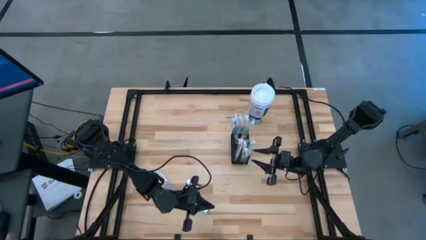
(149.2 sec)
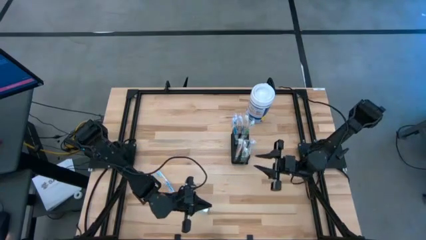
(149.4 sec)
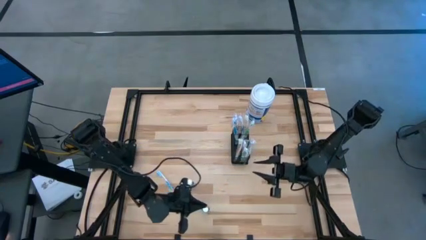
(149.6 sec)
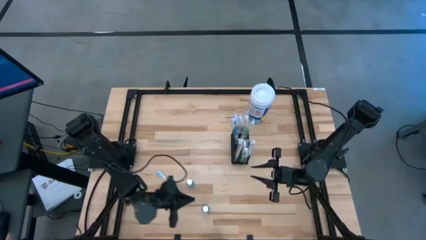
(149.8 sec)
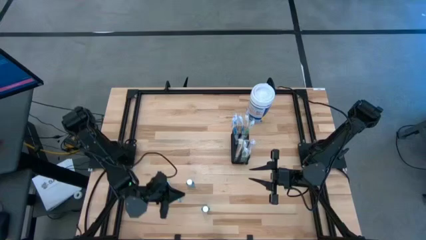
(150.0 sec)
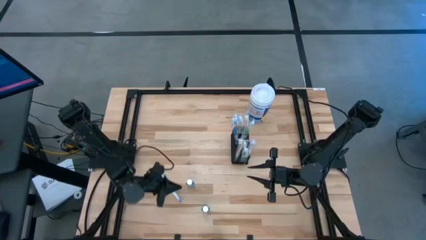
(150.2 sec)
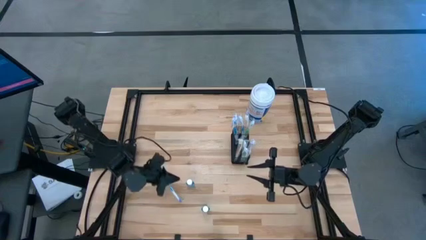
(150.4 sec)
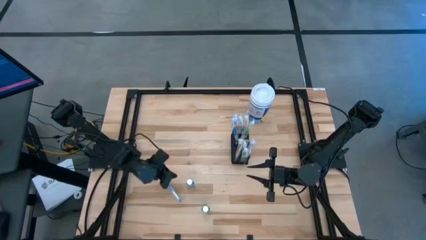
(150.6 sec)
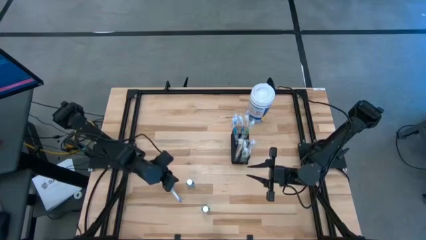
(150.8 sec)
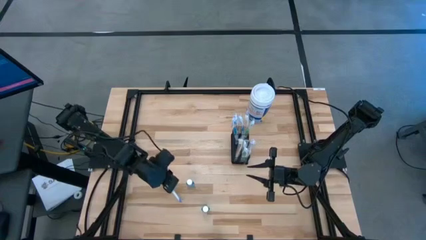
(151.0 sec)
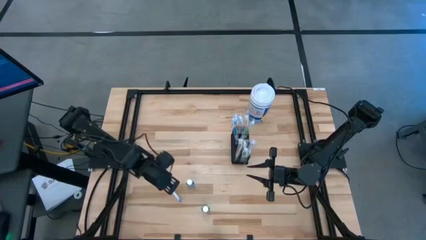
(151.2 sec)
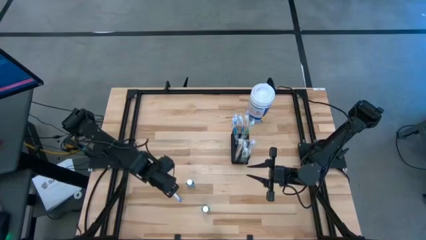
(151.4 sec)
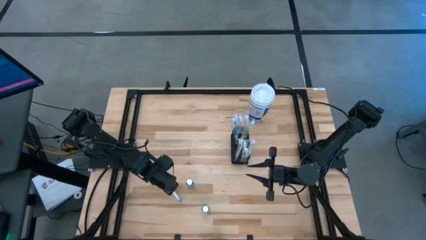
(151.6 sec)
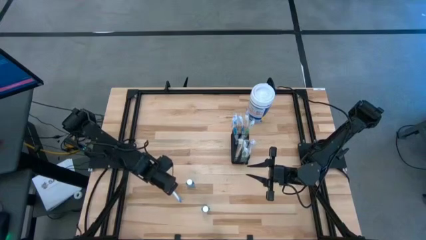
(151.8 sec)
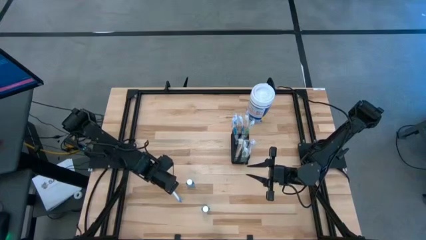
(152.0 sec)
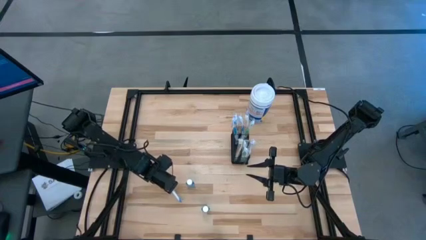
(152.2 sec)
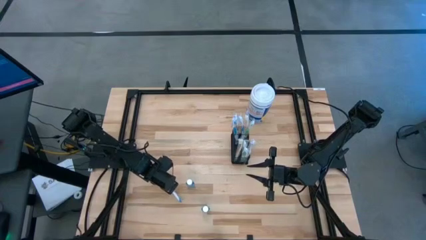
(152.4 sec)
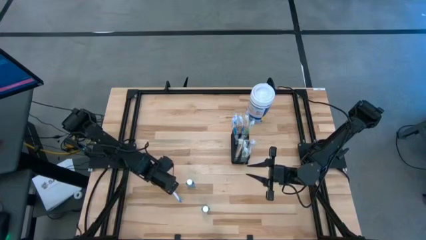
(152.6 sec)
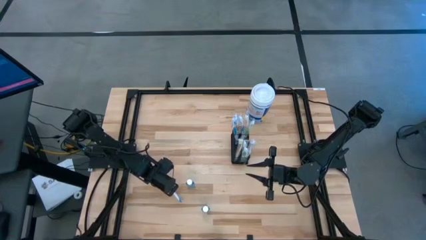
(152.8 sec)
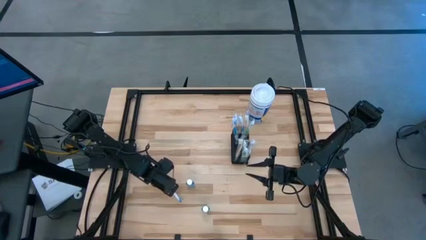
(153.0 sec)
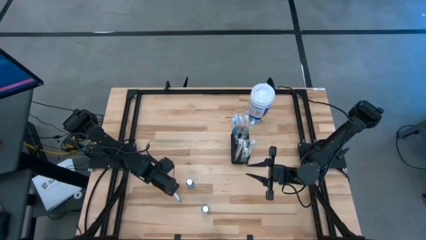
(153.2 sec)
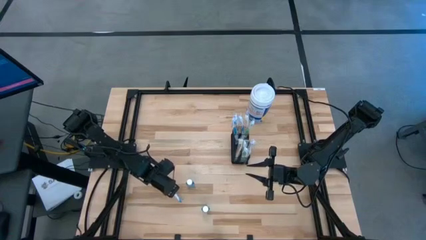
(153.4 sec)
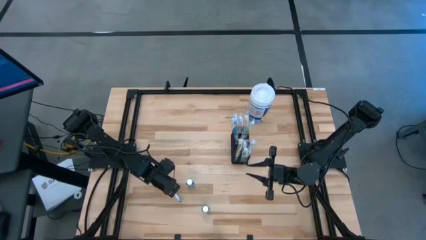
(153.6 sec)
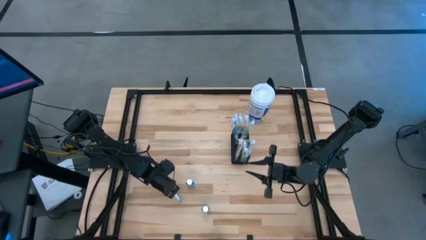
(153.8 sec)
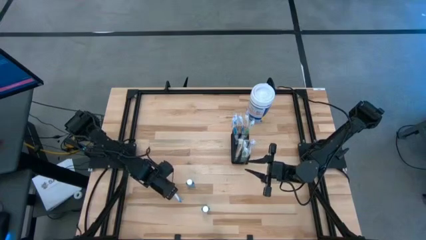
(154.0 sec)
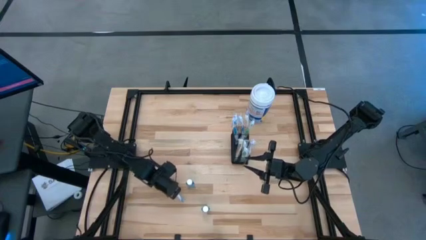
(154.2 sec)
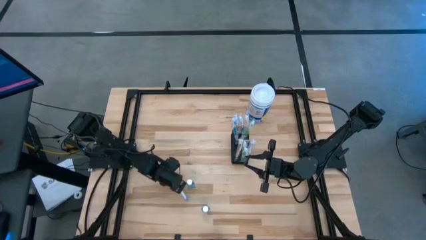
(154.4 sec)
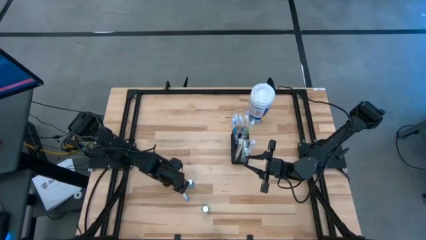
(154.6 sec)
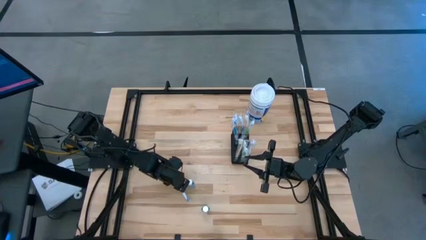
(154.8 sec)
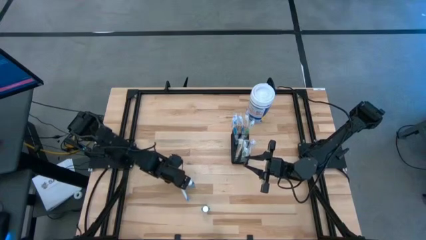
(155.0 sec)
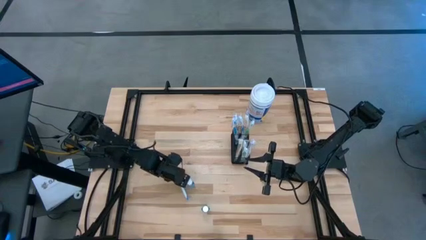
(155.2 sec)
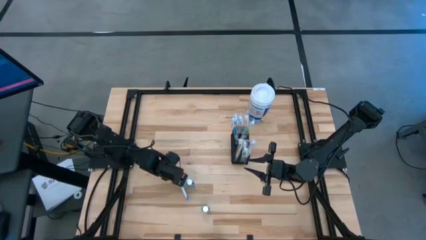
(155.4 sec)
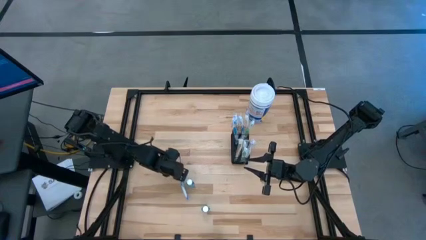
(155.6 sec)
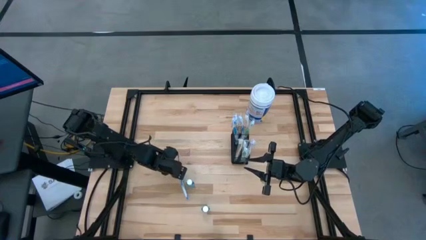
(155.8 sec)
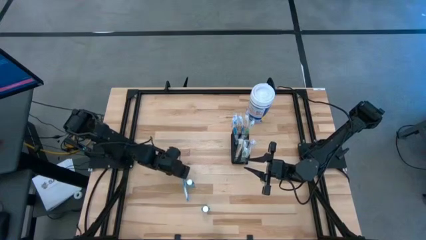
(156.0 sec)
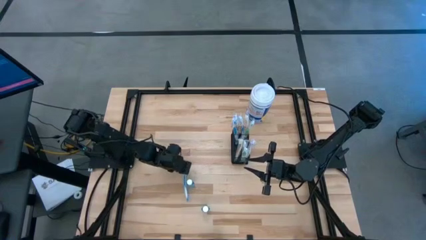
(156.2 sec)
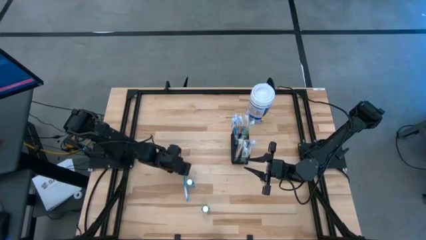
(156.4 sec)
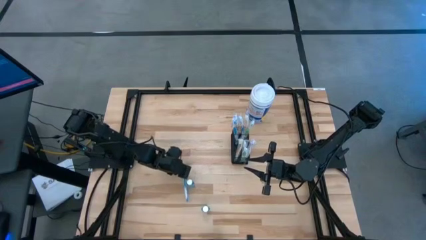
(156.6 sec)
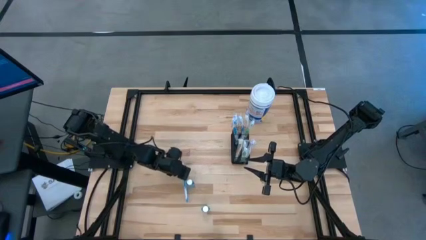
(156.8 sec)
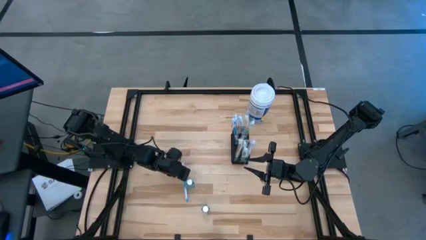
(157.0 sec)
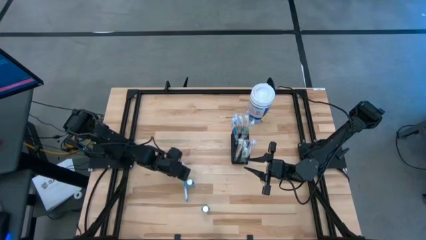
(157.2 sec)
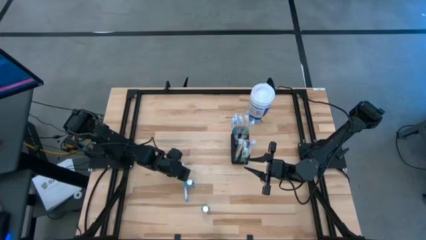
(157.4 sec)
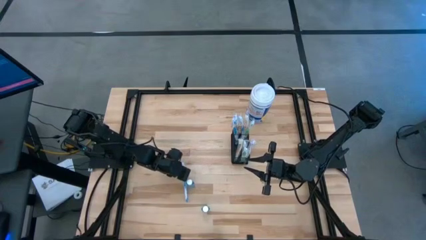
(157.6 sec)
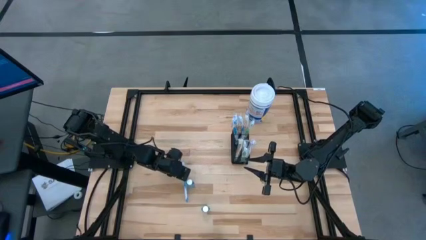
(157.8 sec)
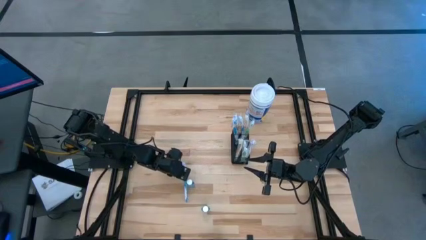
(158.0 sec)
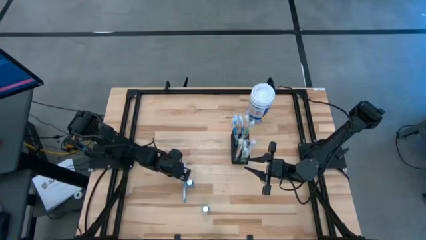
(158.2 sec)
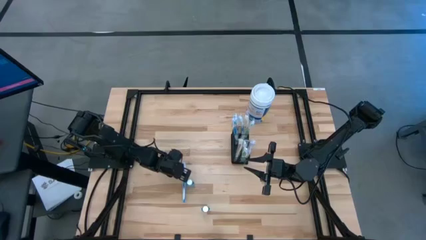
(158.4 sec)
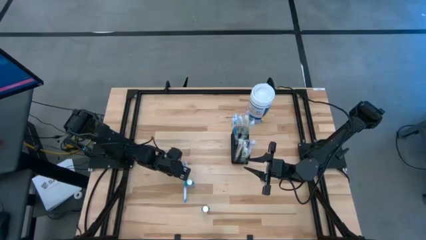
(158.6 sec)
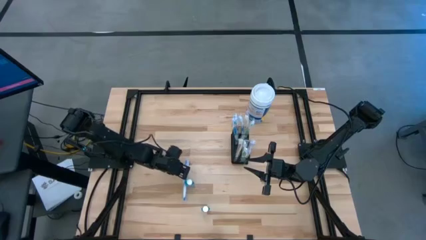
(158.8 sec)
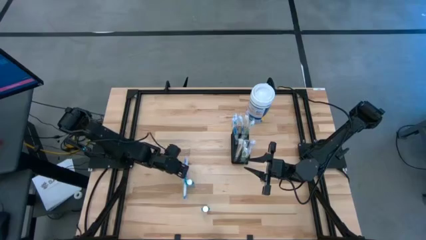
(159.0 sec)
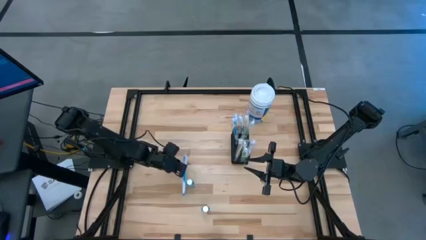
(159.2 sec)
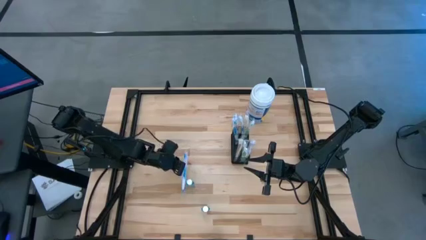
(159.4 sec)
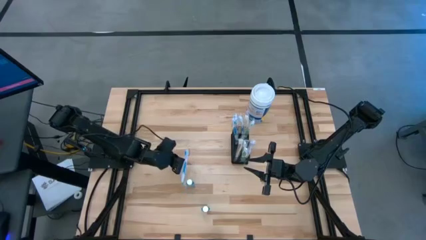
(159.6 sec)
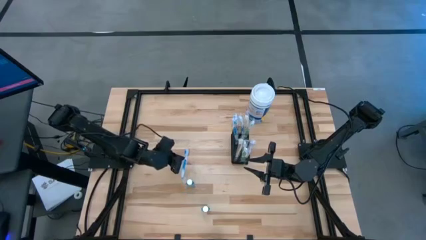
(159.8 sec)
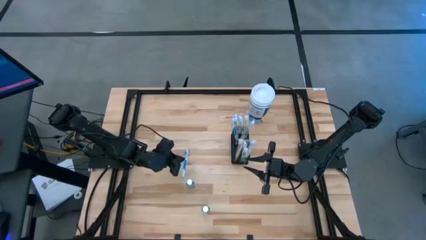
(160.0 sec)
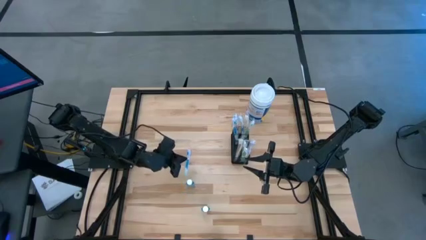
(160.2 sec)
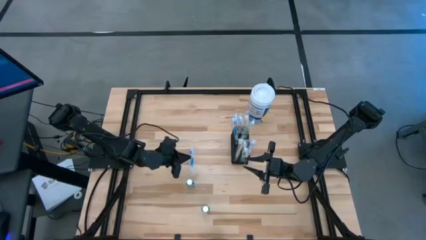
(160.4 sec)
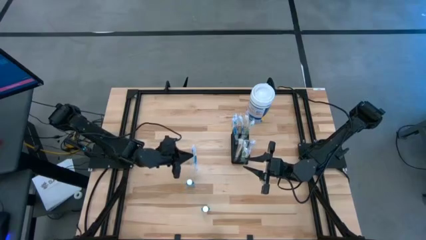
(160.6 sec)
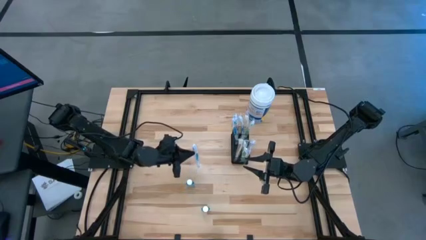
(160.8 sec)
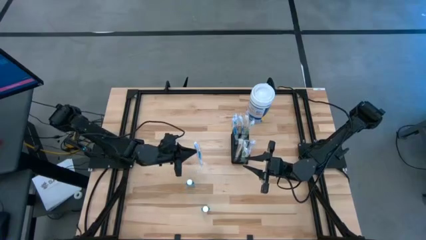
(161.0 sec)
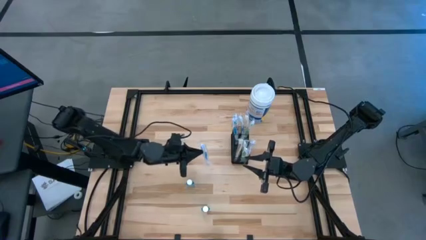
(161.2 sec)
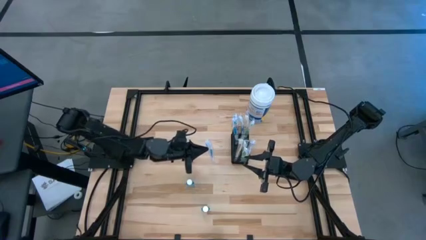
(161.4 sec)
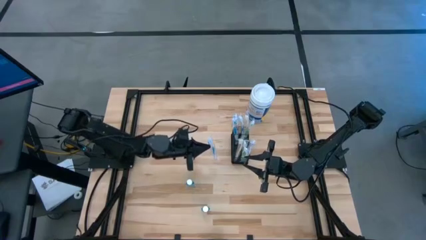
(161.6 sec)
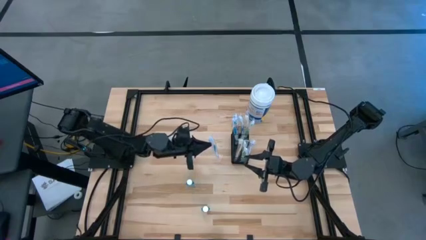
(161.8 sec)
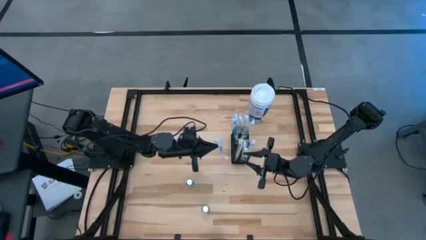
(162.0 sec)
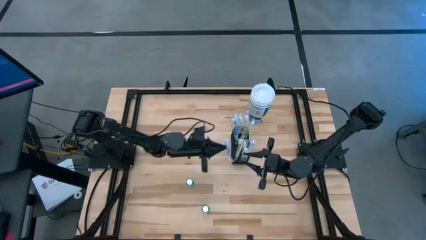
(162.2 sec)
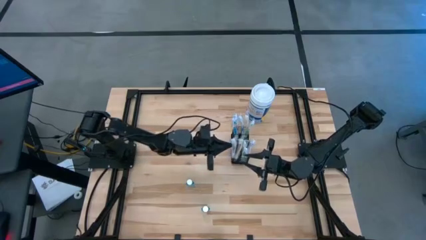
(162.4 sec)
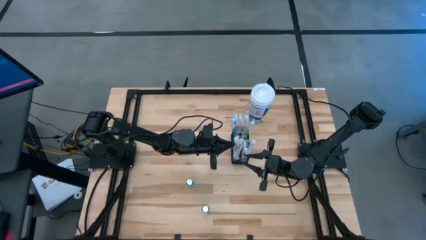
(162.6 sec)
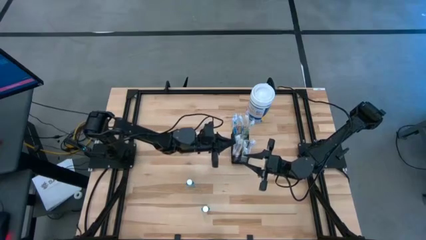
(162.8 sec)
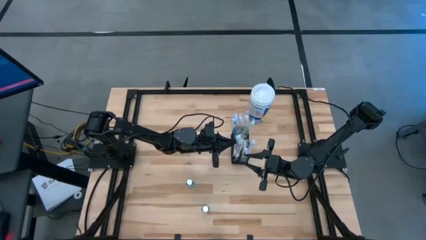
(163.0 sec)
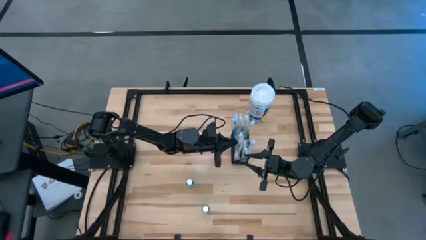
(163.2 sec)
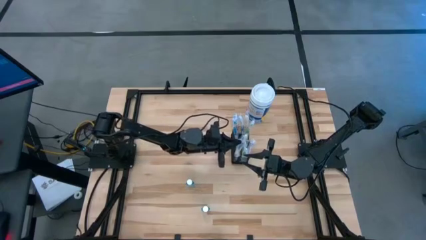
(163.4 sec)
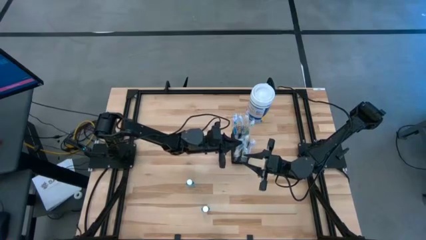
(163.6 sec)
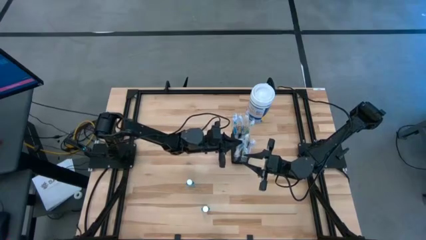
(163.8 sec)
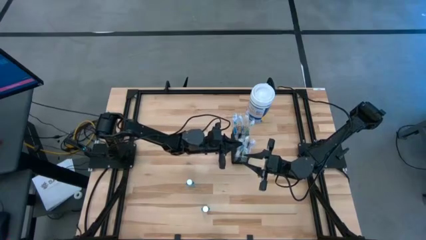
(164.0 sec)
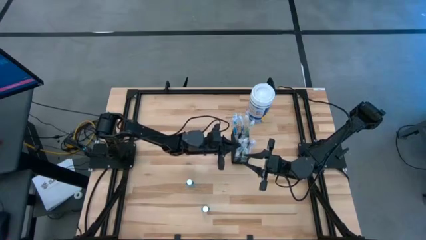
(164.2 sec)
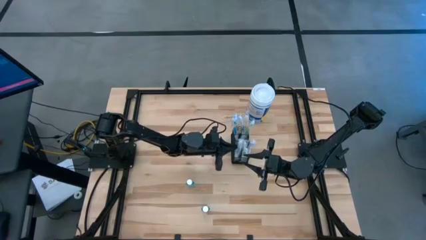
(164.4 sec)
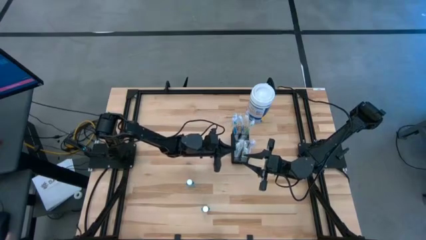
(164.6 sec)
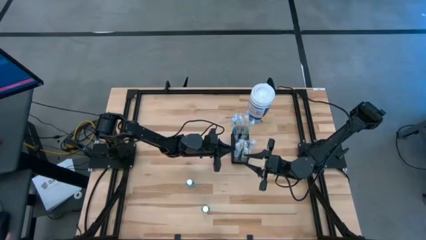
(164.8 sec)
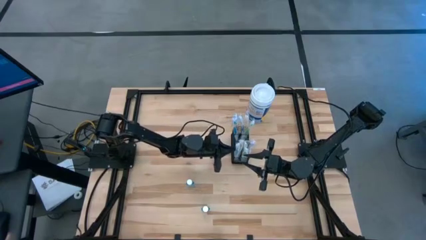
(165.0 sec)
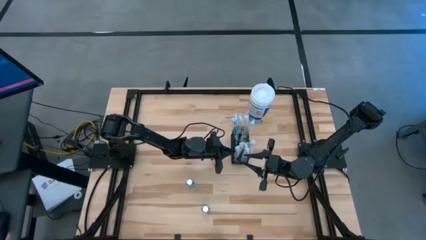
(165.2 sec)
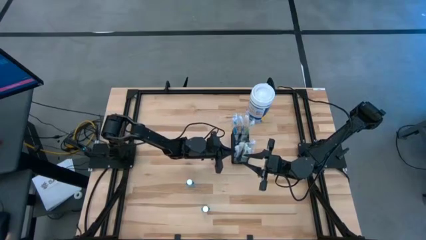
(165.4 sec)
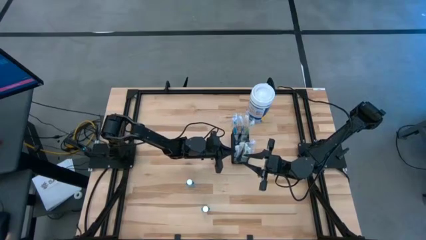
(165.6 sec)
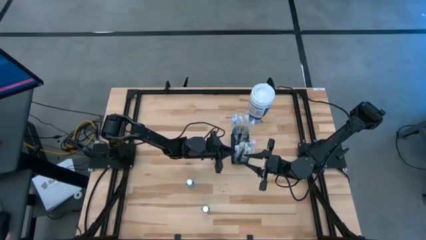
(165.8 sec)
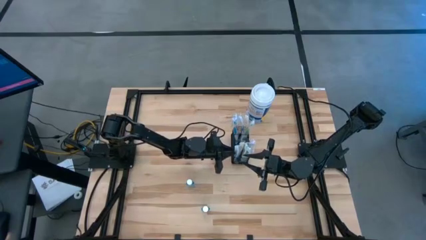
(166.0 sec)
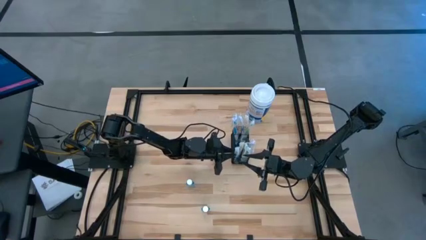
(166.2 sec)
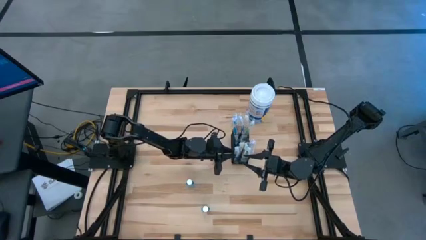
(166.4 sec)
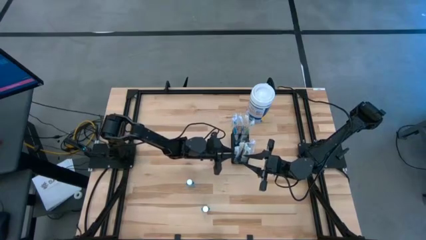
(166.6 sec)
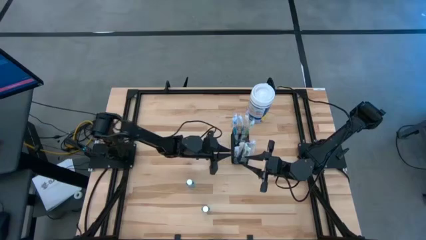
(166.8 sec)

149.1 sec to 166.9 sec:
Task: Pick & Place toothbrushing station
Put the blue toothbrush into the wire mesh organizer
